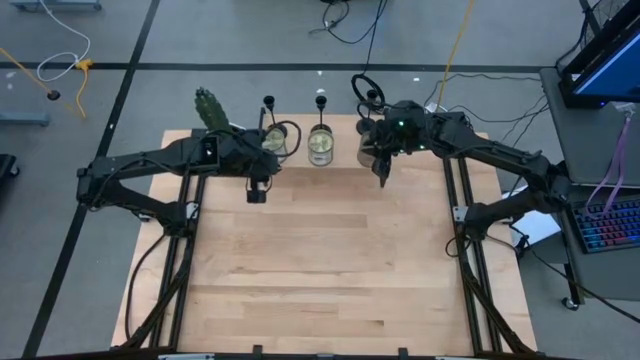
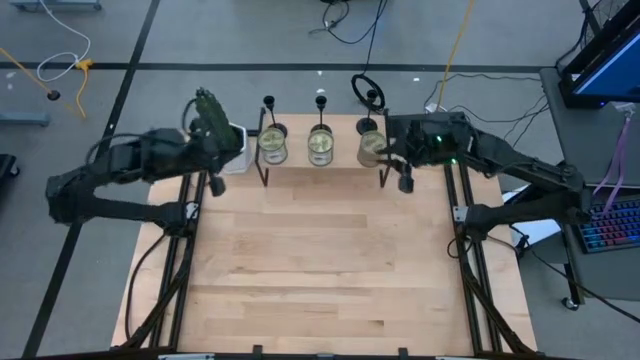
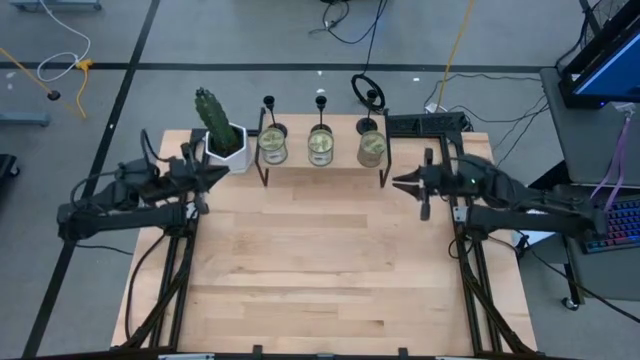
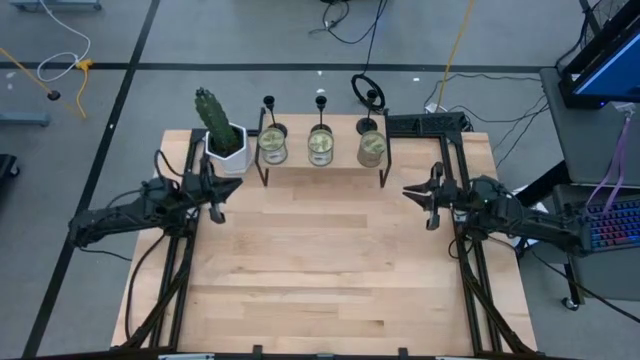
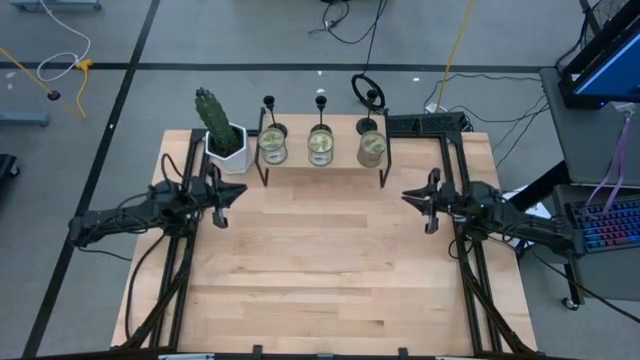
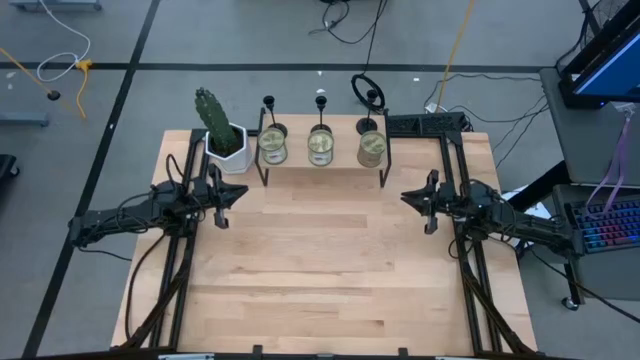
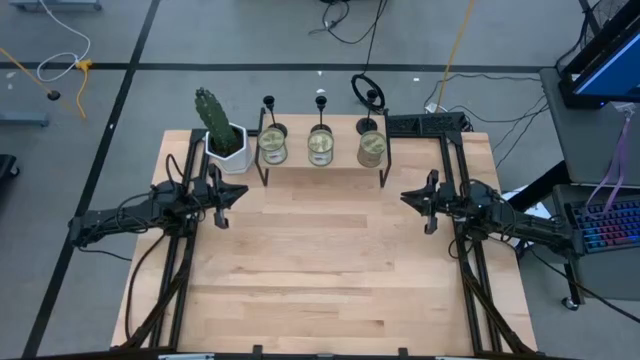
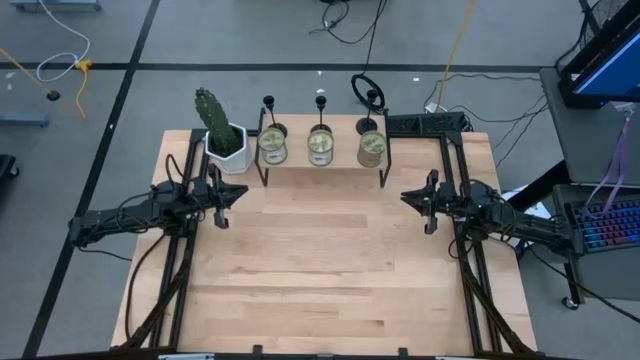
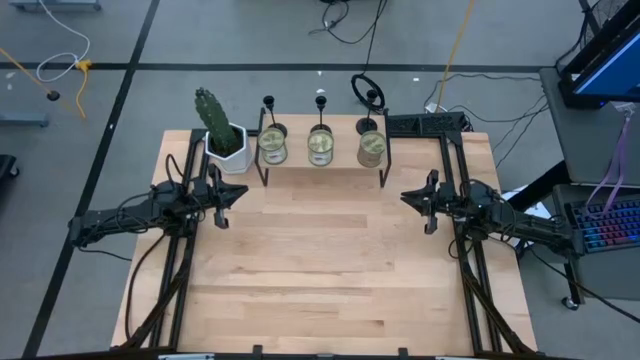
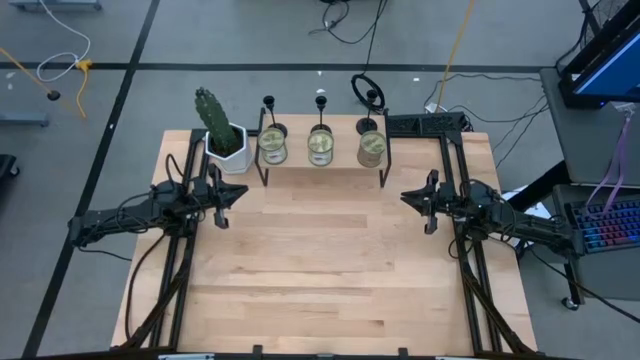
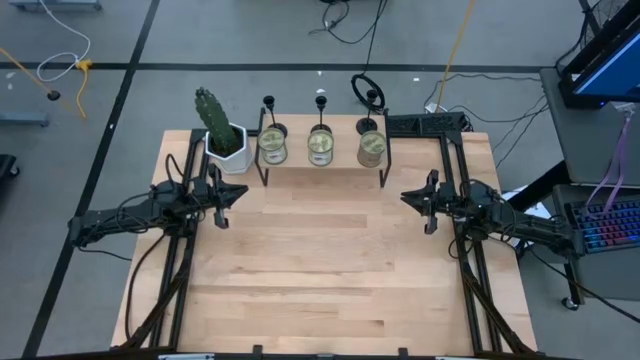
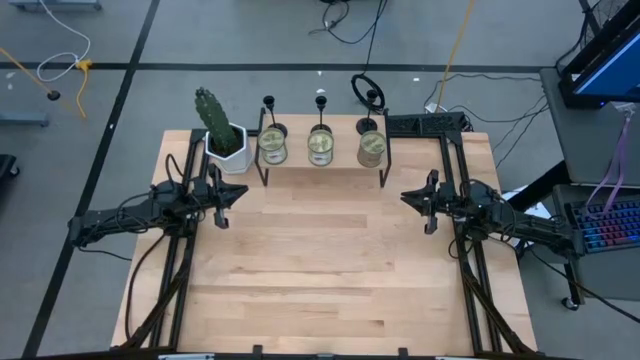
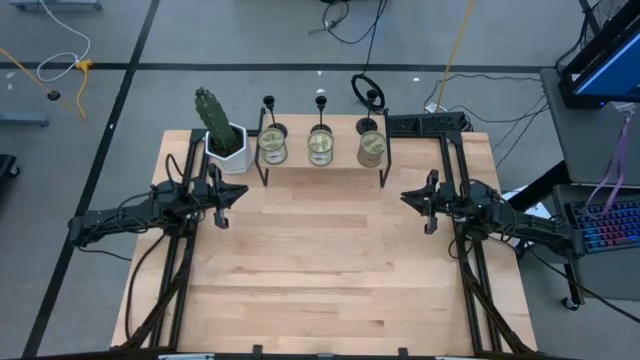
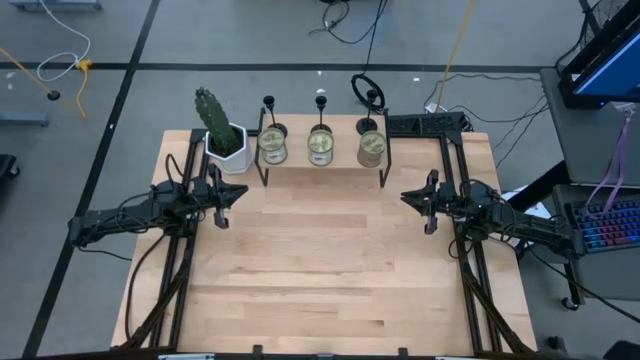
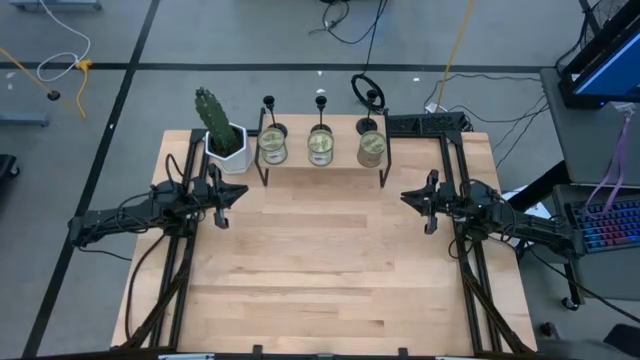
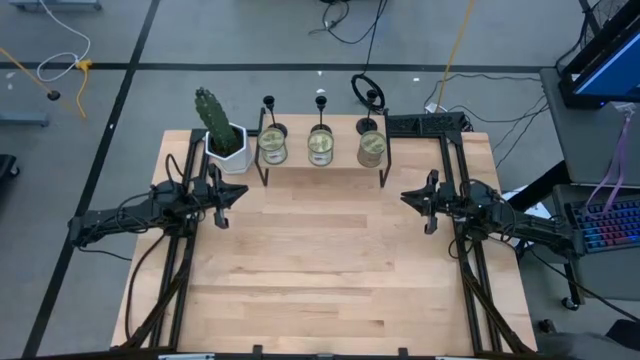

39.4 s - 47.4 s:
Task: Pick & Place candle stick holders
Return to Home Position

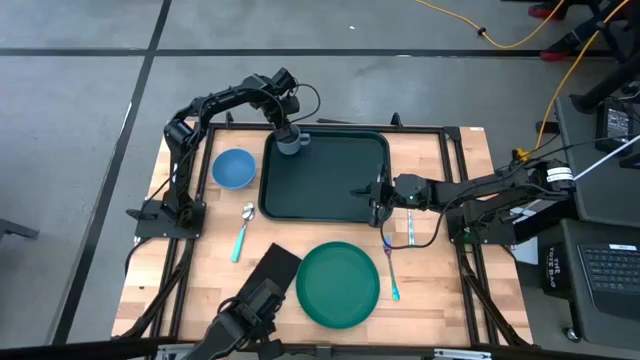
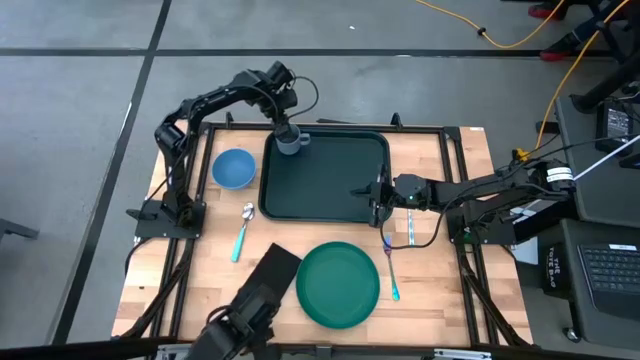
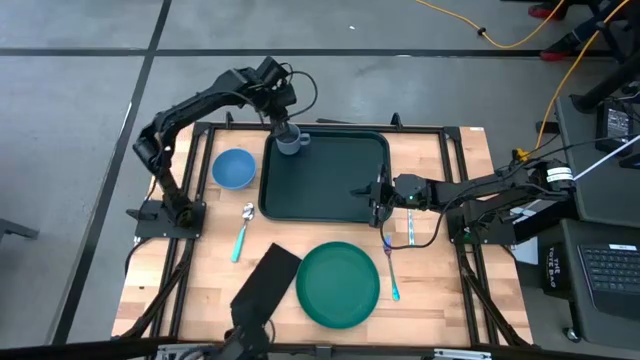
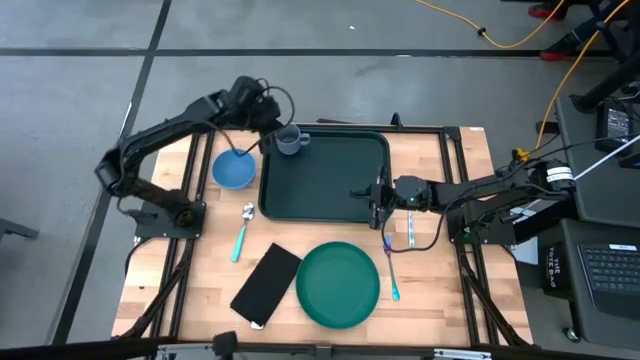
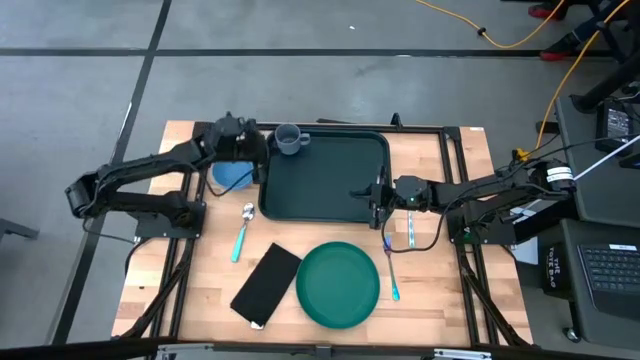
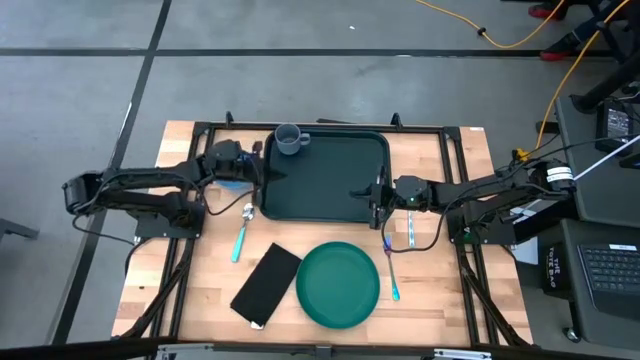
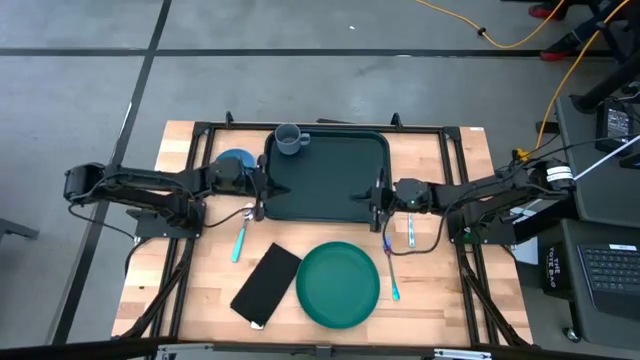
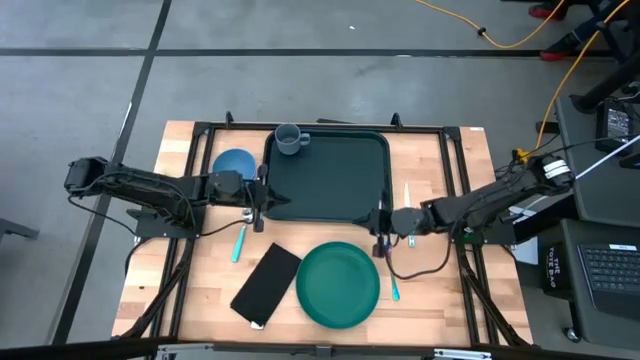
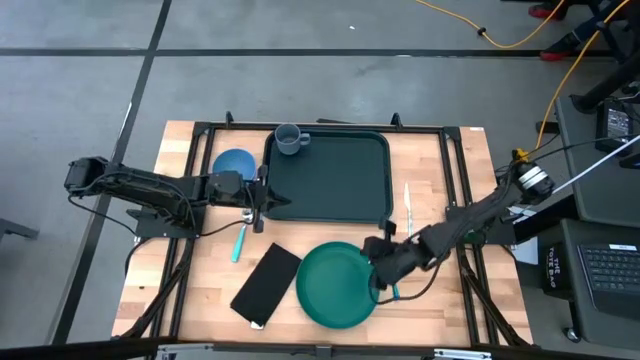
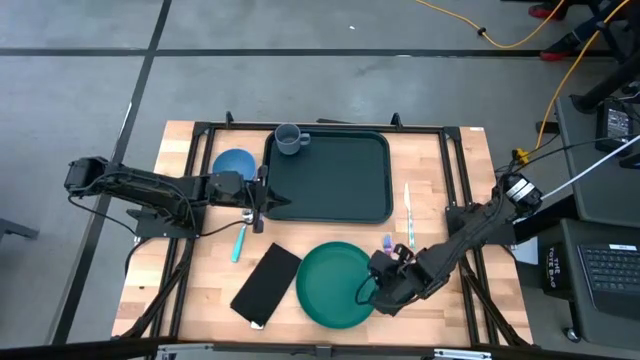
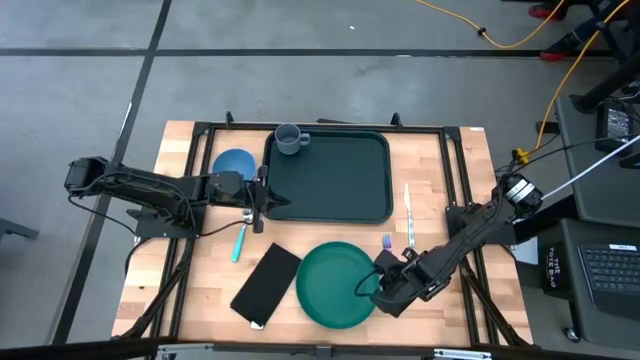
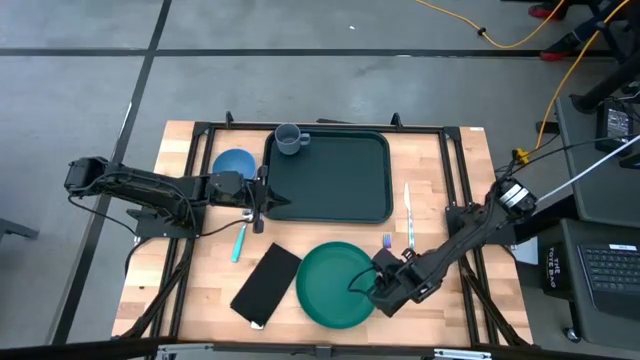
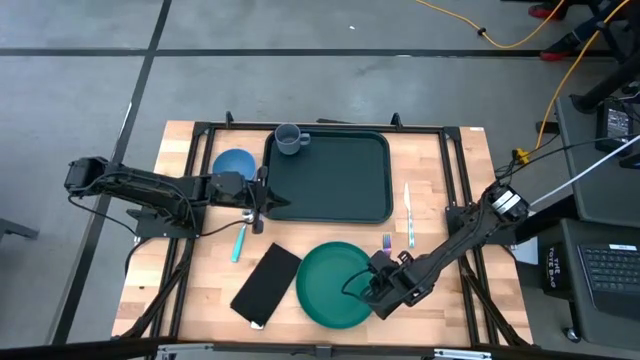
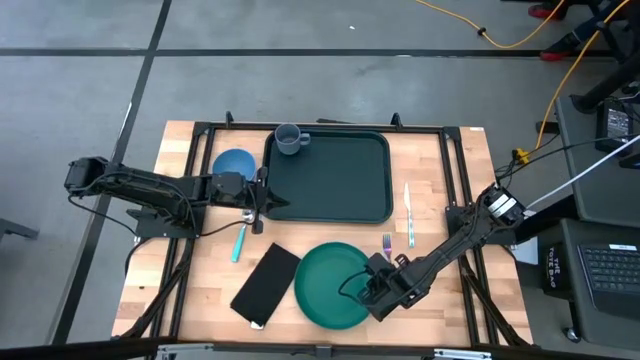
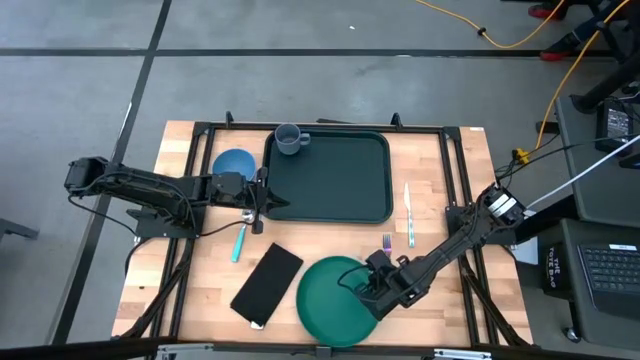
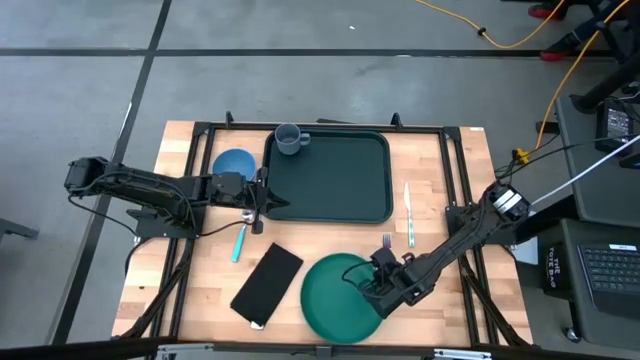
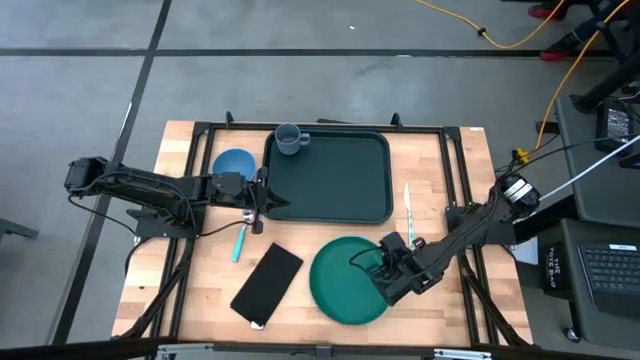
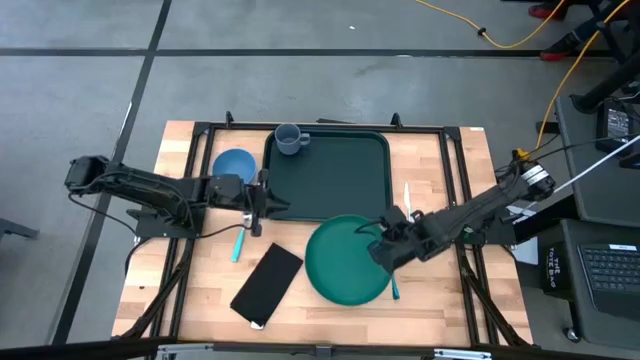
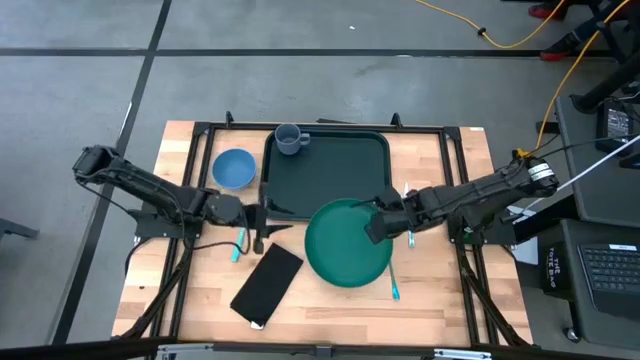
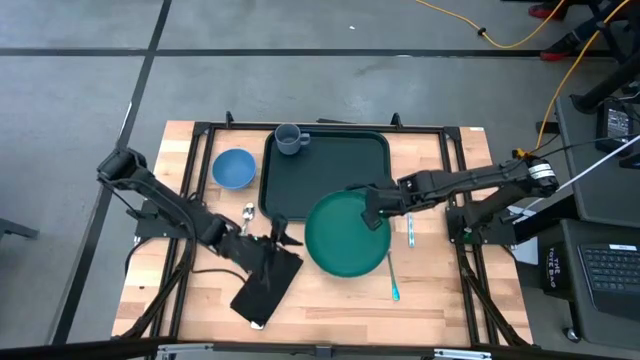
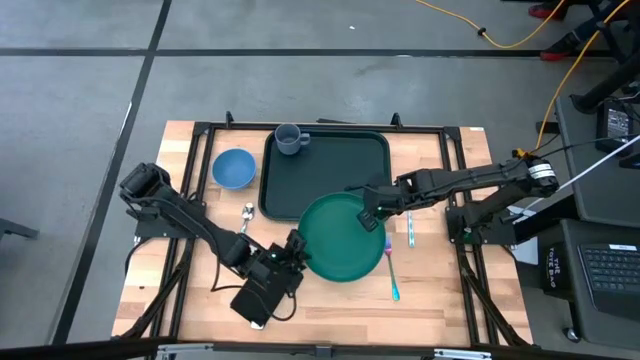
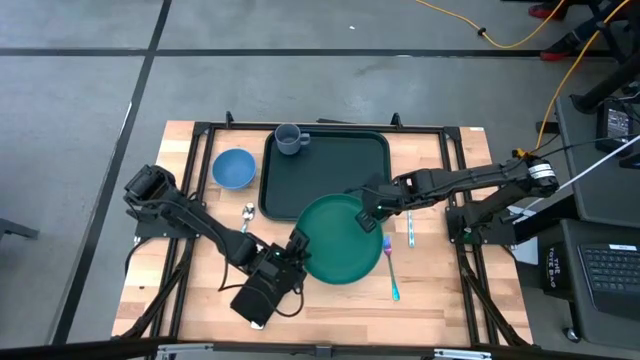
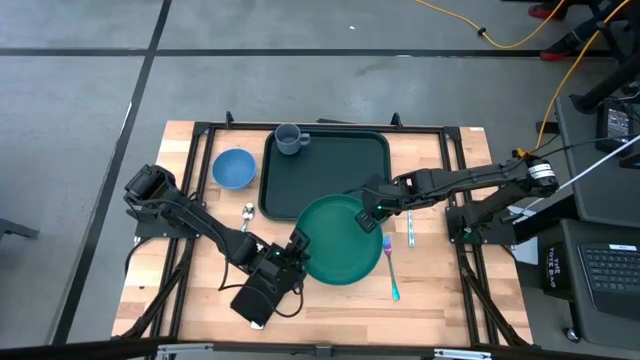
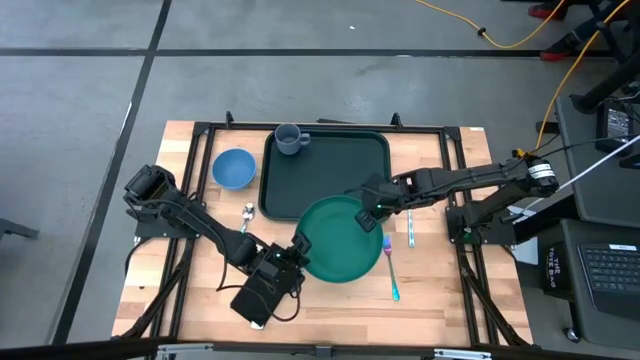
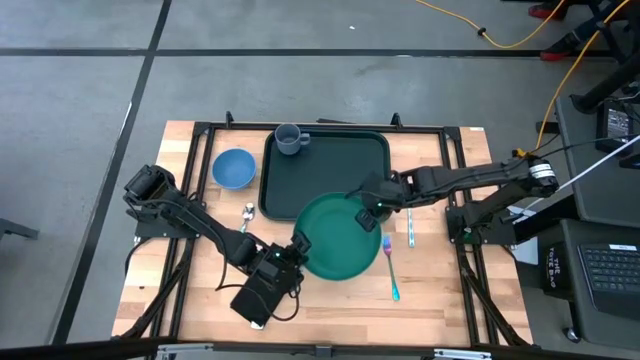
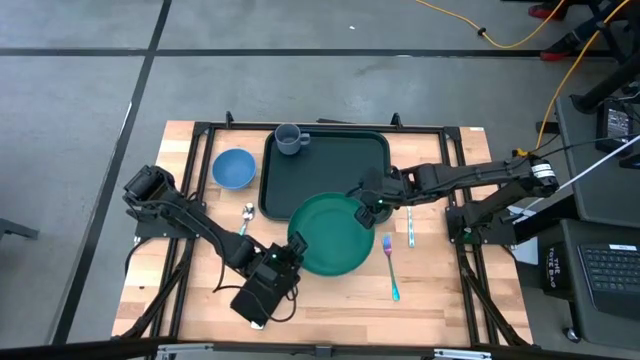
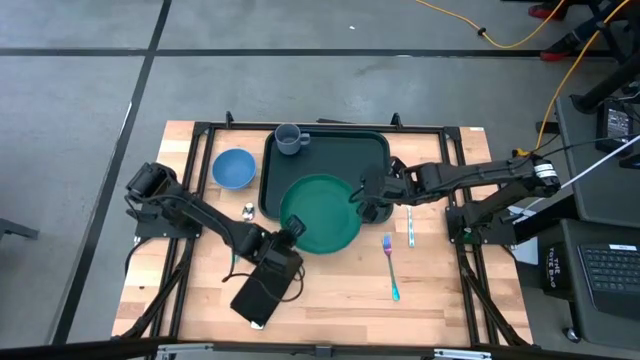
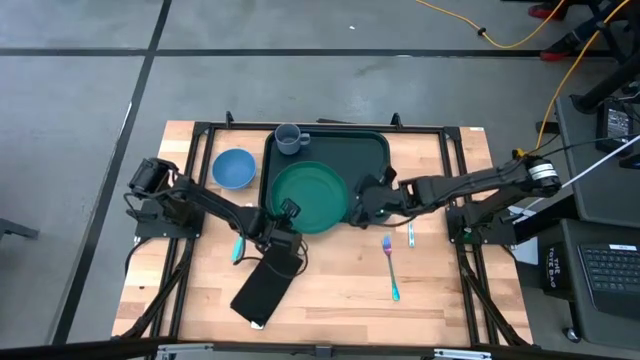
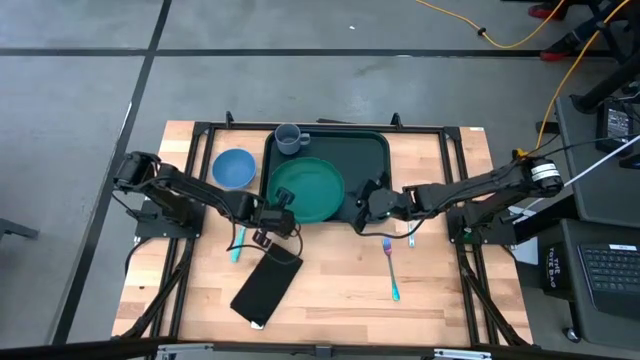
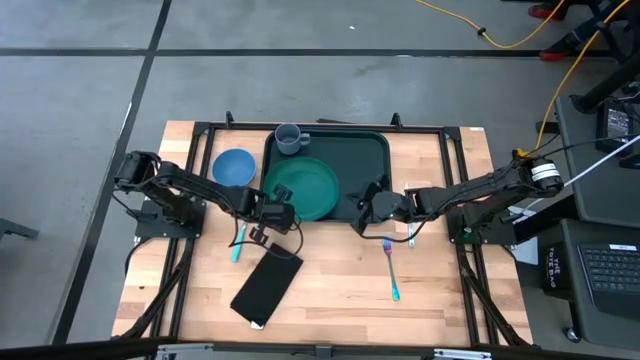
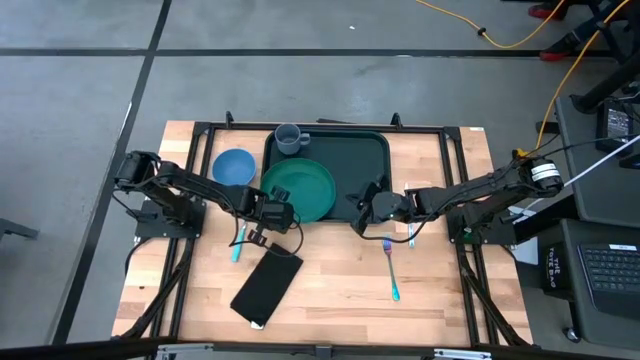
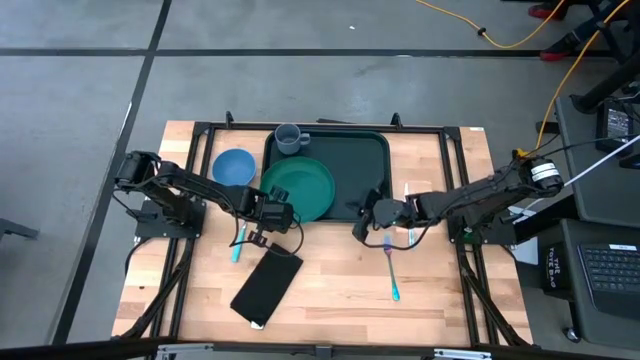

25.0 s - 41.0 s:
Task: Set up tray
Put the green plate on the black tray to the bottom of the blue mug
